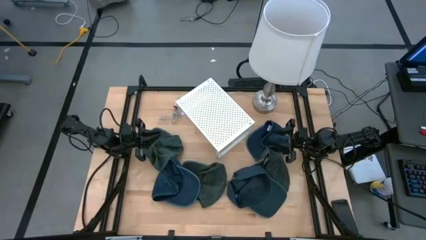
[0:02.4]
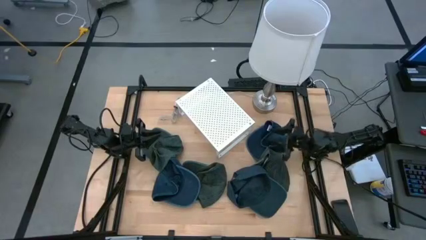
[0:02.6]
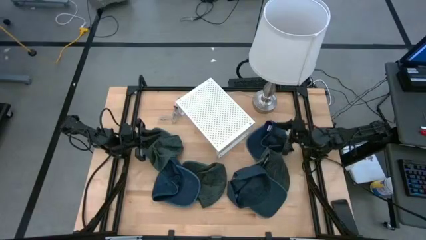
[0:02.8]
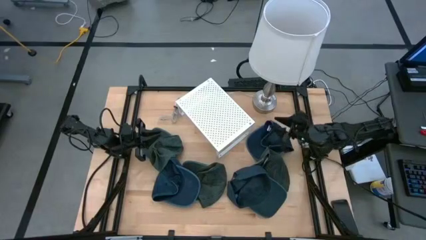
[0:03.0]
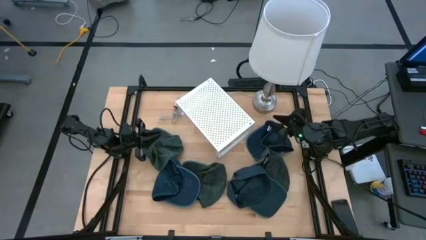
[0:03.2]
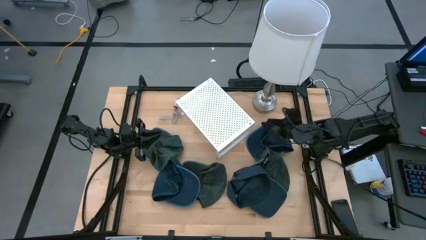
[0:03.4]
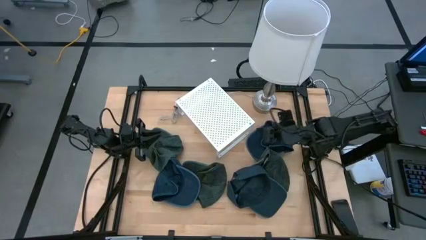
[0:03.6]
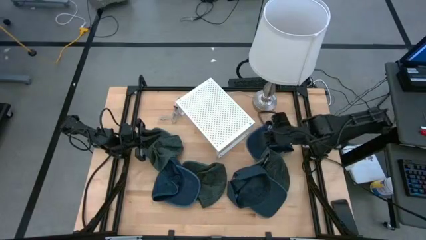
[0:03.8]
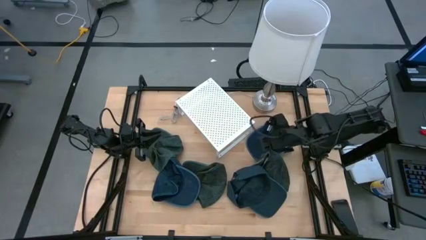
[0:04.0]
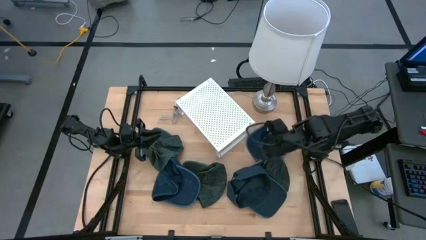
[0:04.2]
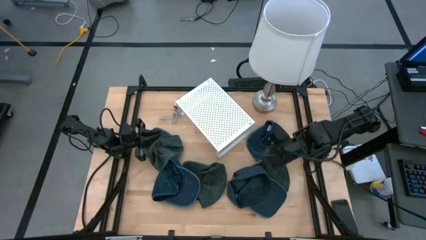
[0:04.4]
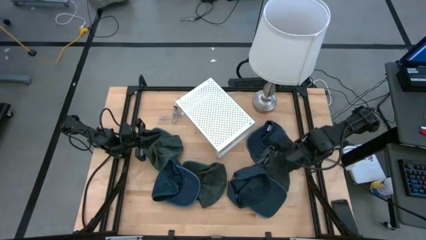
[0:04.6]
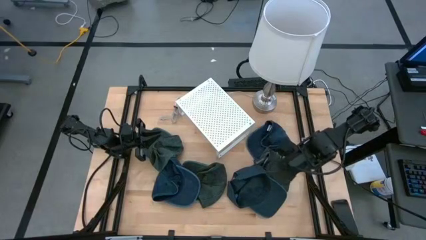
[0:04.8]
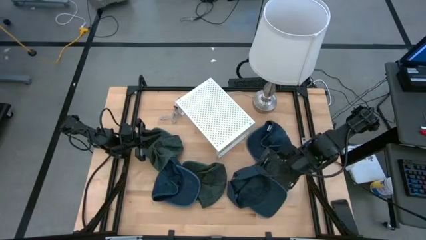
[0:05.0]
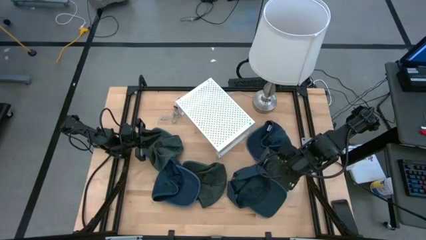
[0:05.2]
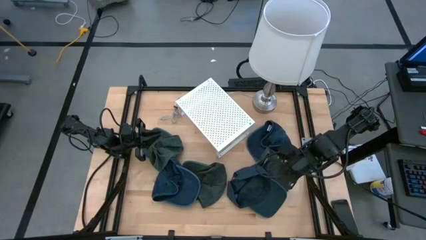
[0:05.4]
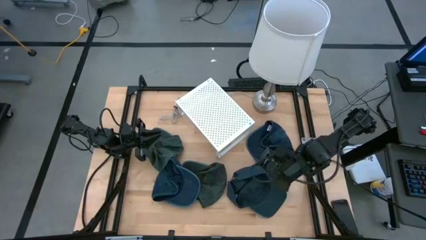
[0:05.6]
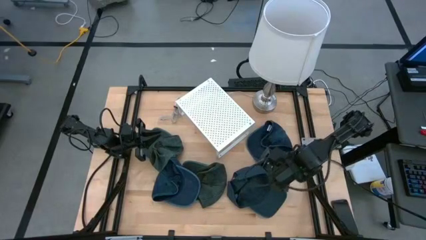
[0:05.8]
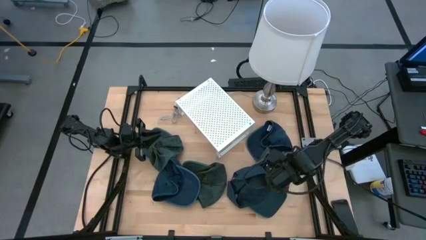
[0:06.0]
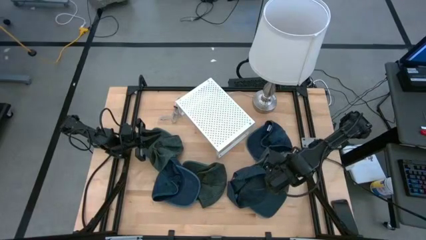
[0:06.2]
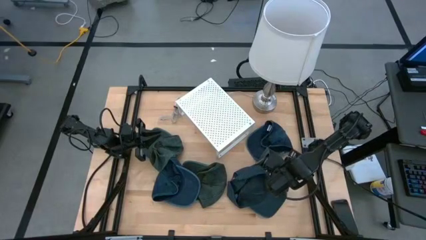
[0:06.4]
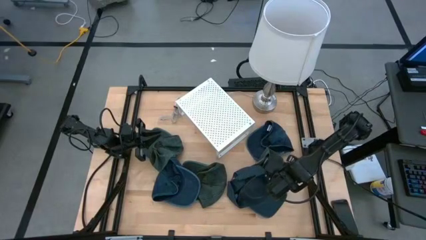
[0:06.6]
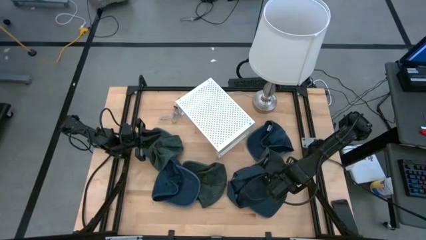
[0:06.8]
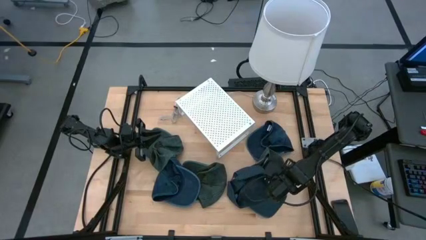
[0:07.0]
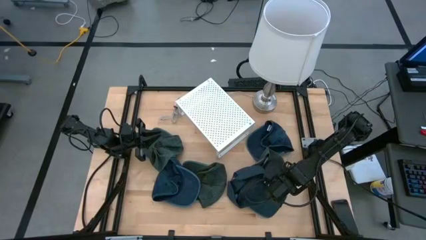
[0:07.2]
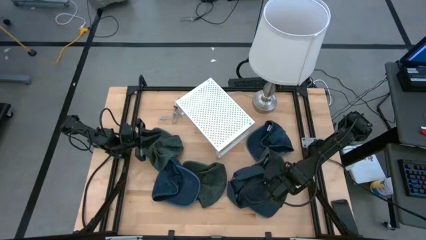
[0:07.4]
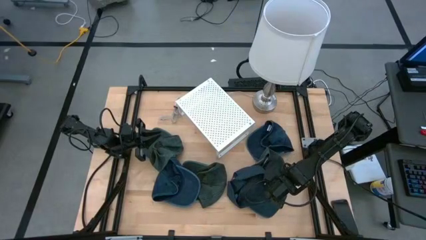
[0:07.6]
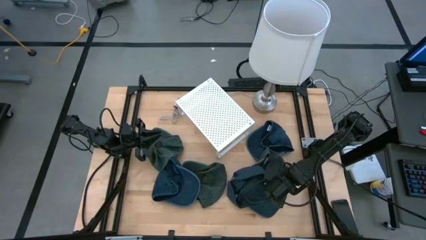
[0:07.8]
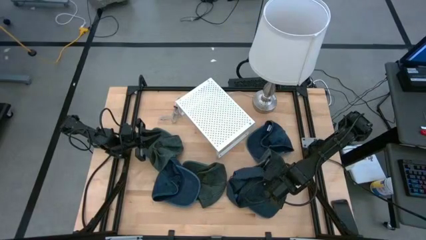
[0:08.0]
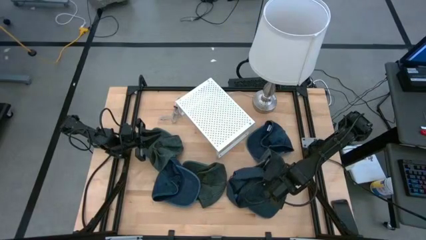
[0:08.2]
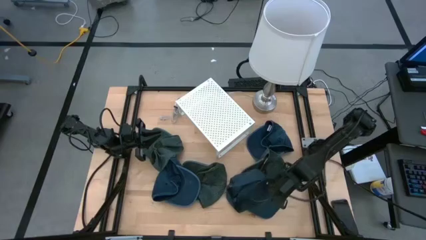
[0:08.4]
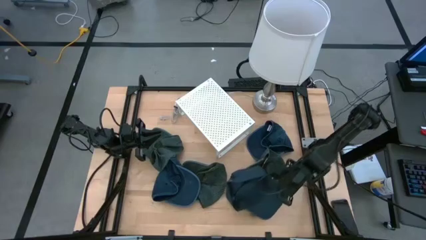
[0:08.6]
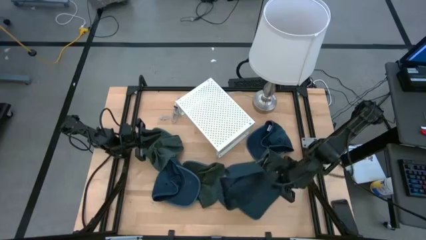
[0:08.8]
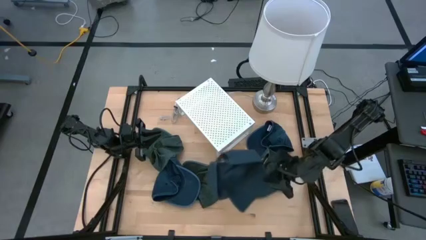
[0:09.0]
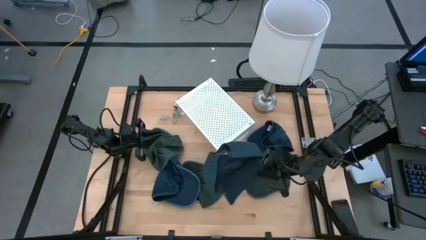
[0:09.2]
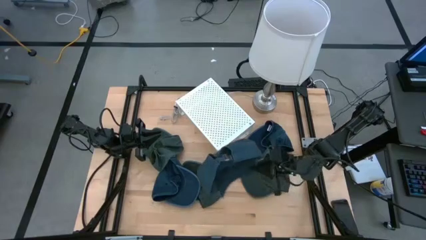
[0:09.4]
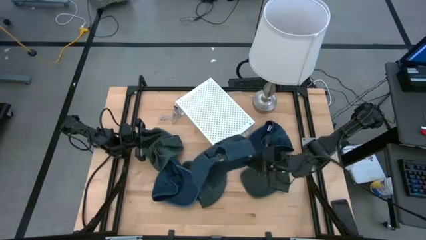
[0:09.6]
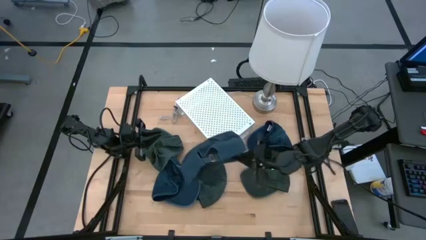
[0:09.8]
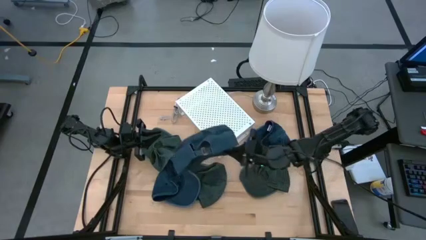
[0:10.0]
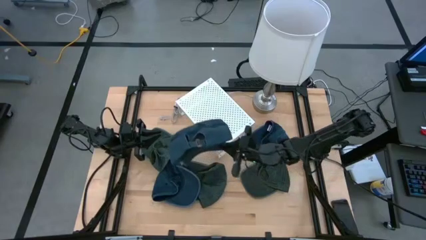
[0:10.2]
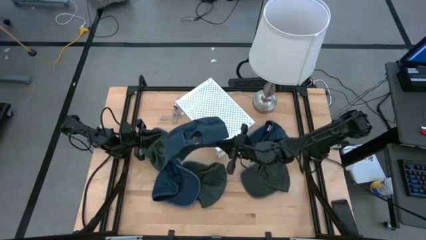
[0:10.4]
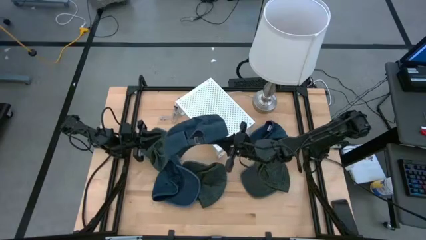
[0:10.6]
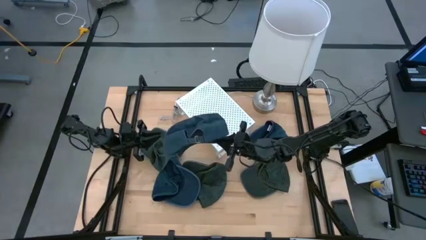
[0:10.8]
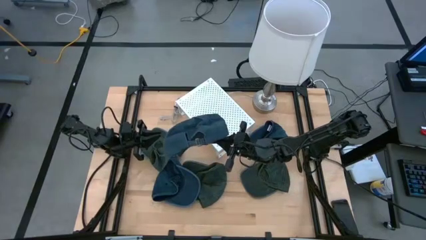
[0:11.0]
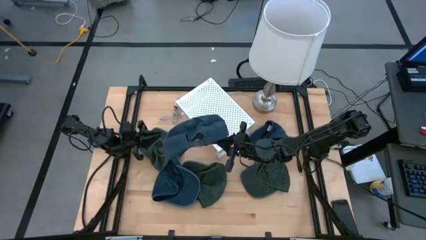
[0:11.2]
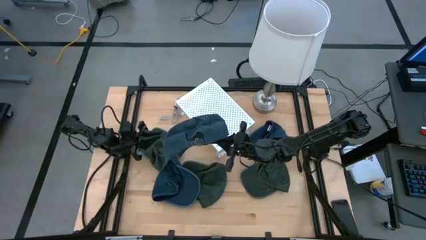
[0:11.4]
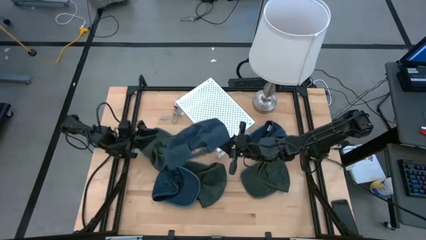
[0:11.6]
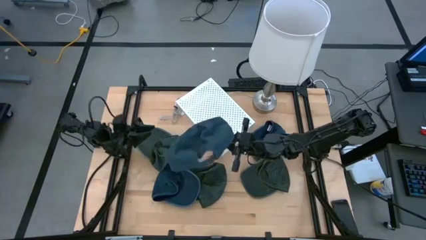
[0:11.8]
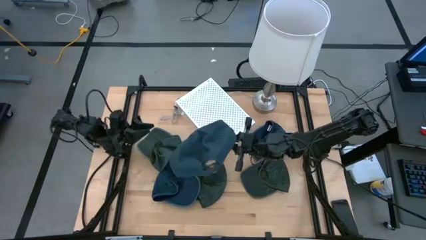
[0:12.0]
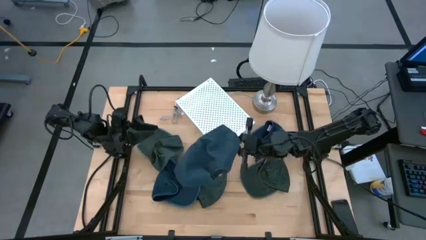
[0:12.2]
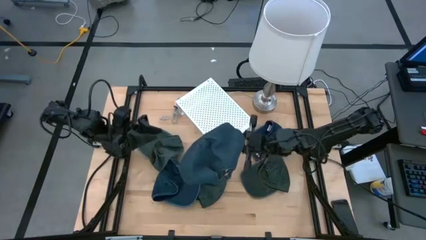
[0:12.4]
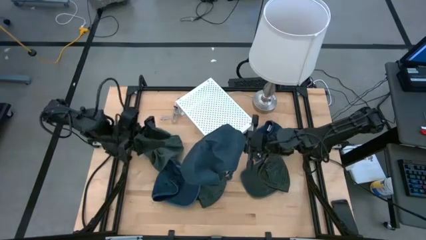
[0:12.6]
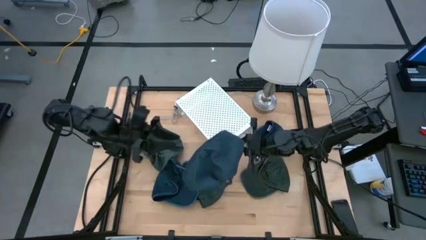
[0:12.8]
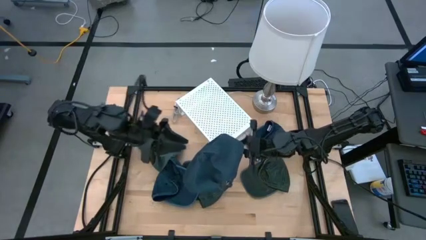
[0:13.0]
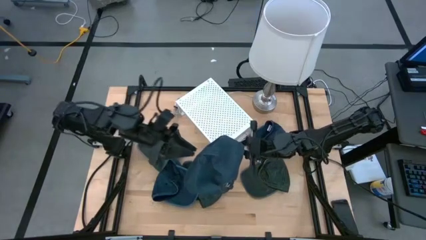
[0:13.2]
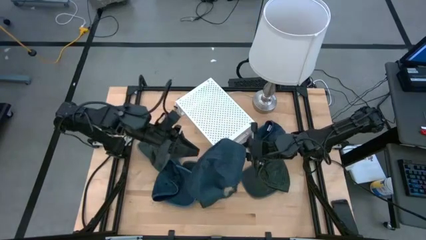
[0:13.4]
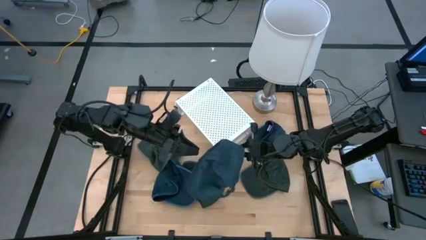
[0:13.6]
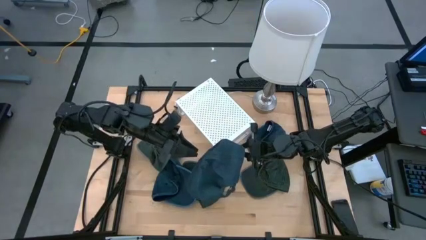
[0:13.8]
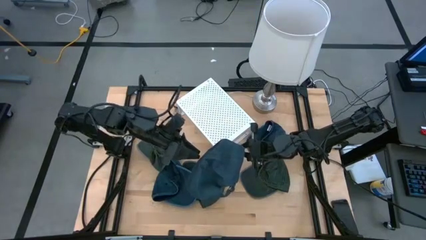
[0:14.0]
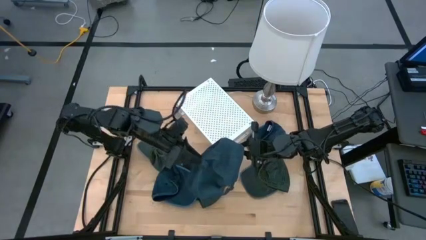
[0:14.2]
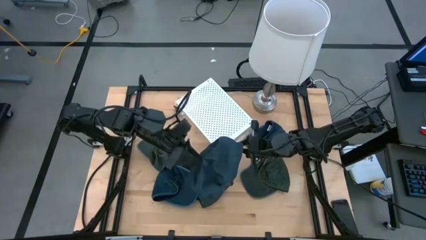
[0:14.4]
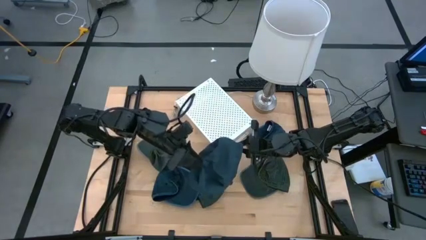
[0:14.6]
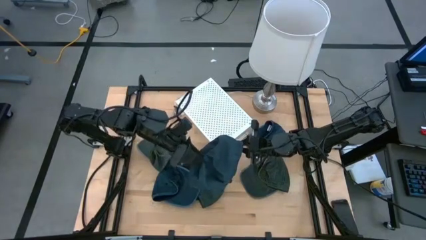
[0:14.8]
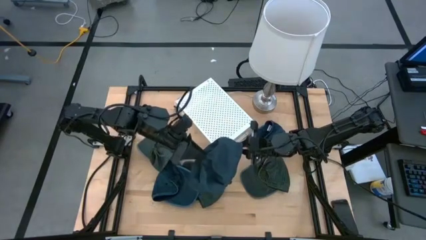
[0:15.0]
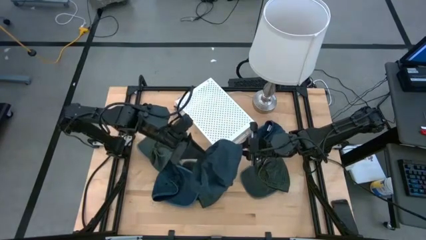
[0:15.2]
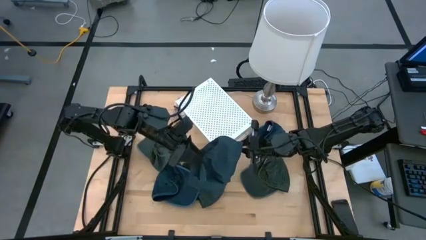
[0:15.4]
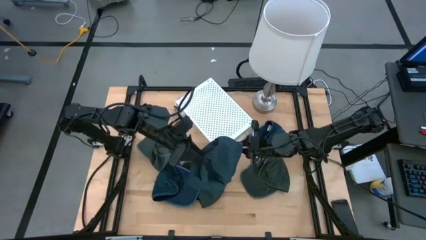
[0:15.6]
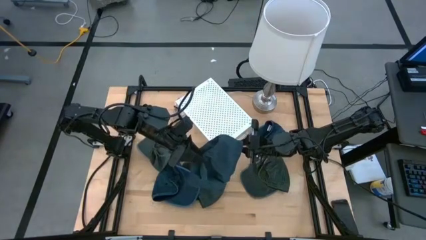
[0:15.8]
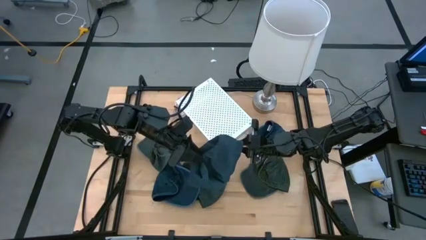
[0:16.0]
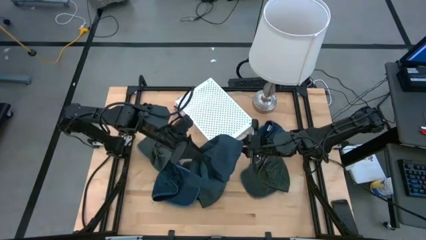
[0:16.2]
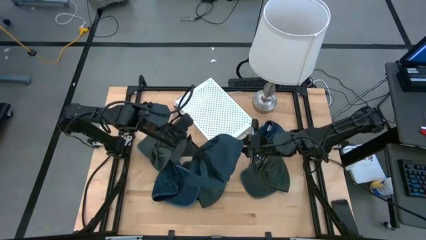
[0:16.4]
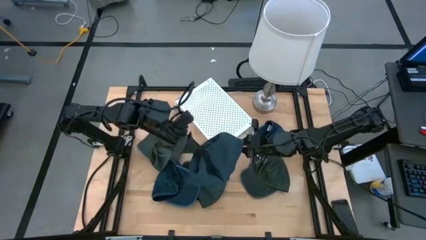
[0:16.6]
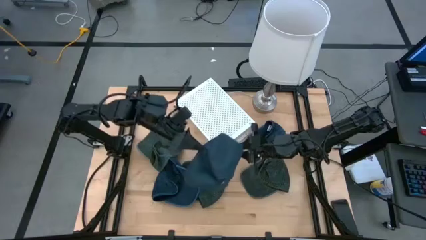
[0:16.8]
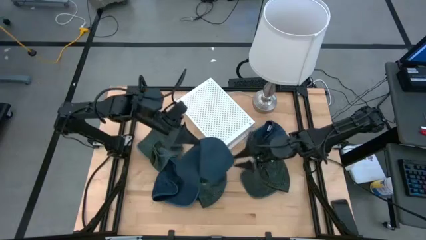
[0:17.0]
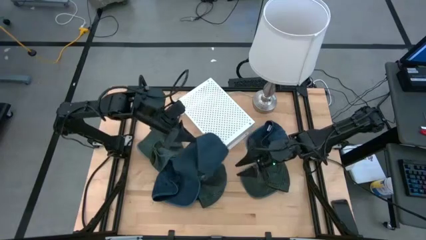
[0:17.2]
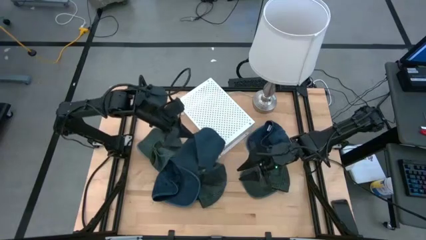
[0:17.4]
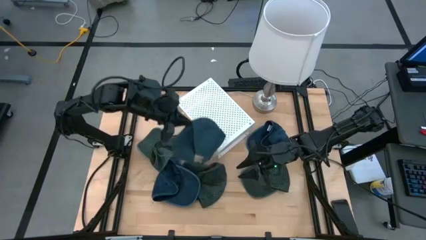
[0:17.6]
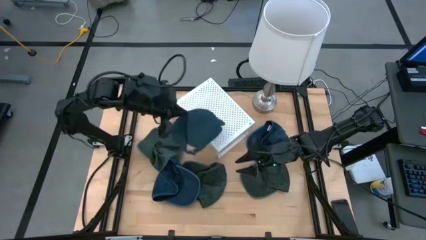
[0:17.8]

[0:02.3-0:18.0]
Task: Pick & Place hat
Put the bottom right blue cap on the shelf
